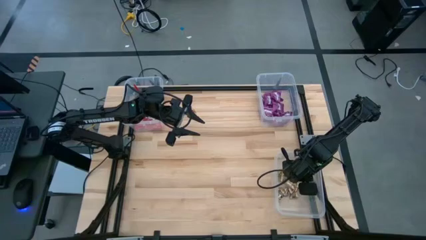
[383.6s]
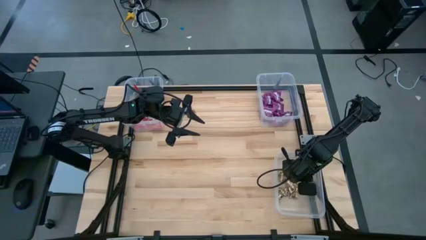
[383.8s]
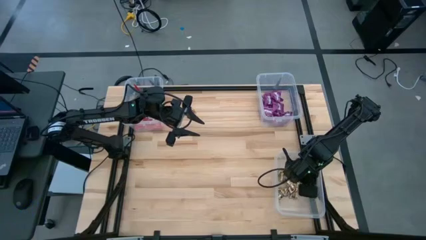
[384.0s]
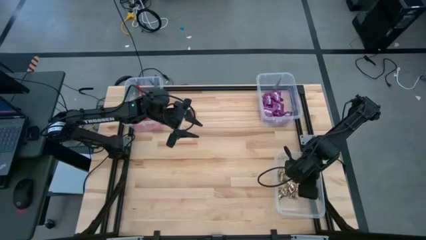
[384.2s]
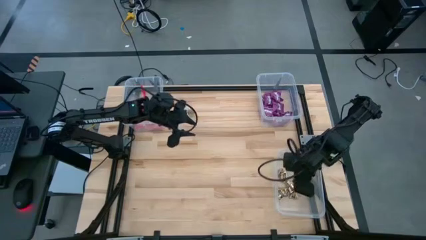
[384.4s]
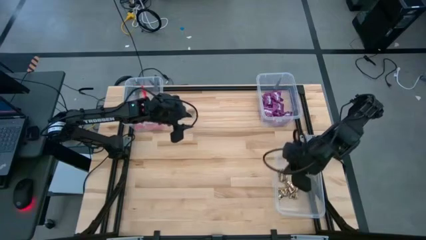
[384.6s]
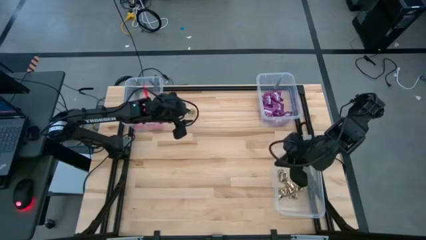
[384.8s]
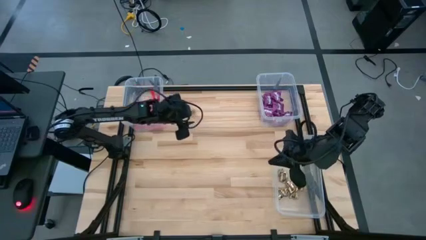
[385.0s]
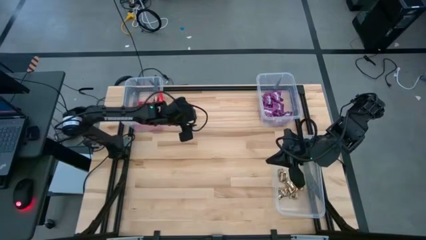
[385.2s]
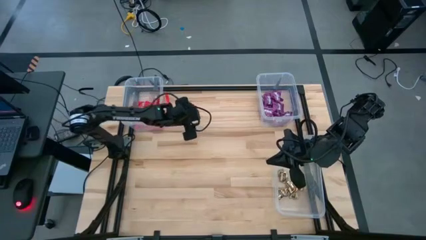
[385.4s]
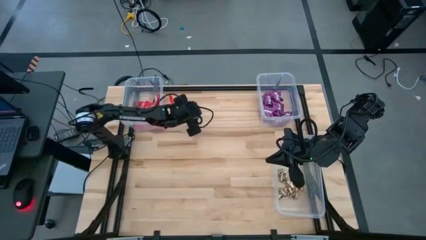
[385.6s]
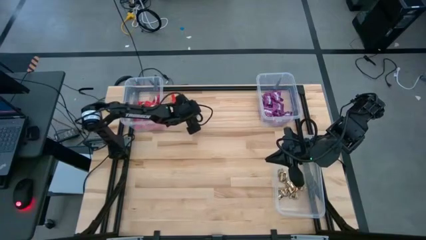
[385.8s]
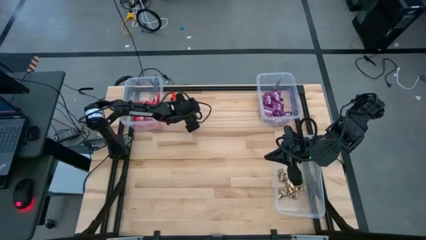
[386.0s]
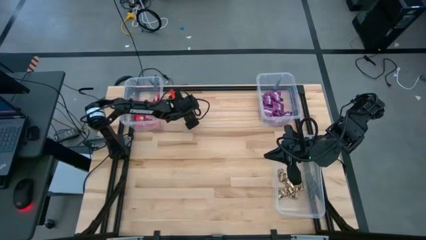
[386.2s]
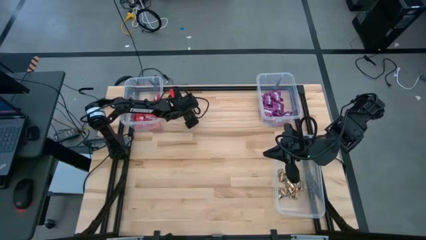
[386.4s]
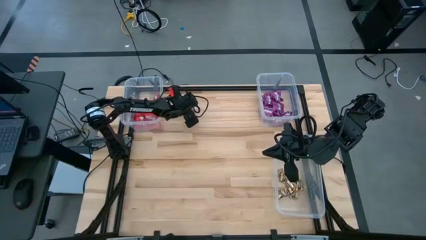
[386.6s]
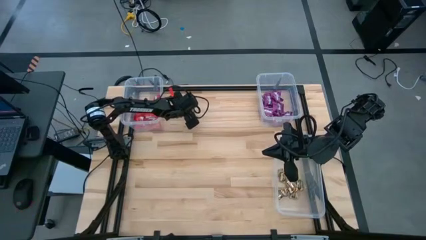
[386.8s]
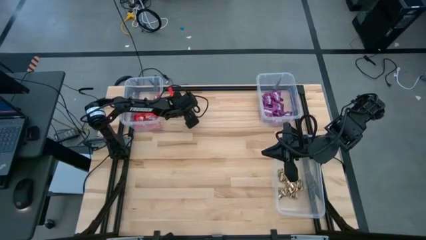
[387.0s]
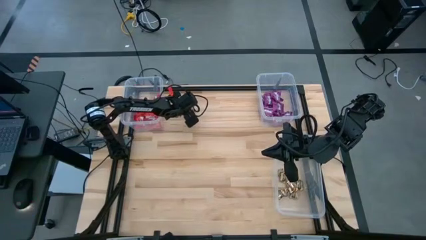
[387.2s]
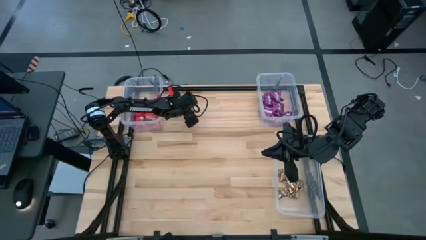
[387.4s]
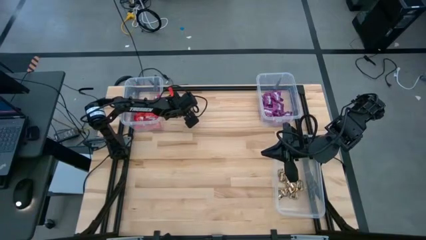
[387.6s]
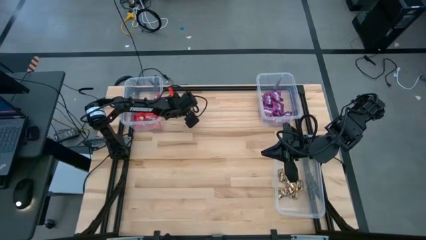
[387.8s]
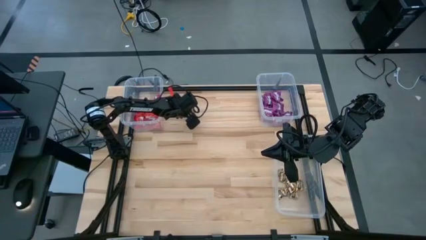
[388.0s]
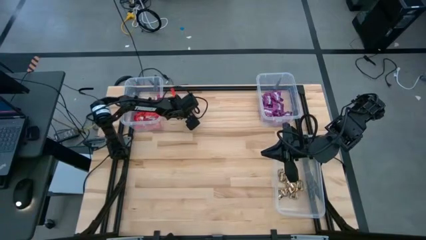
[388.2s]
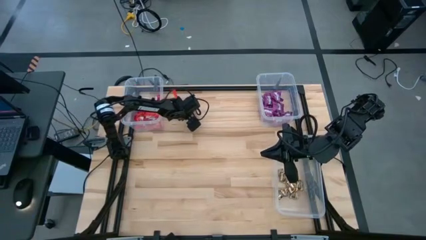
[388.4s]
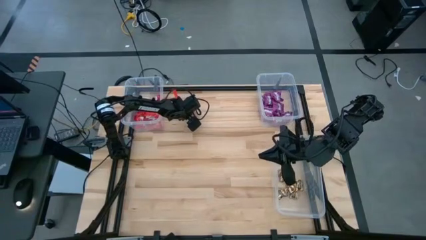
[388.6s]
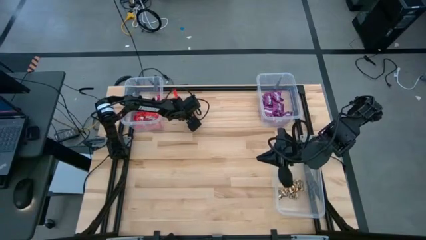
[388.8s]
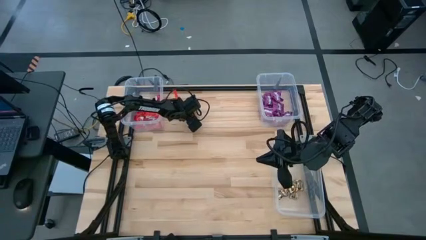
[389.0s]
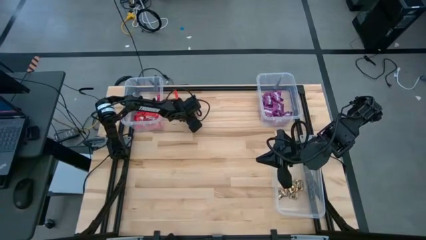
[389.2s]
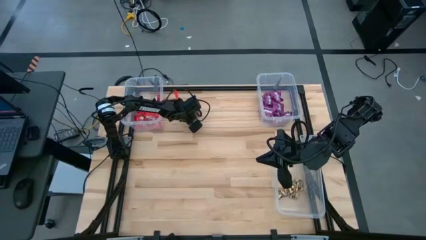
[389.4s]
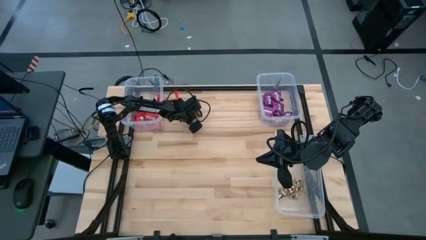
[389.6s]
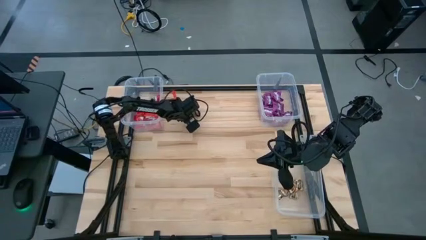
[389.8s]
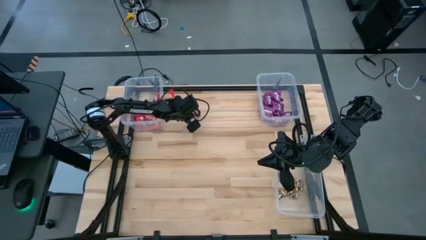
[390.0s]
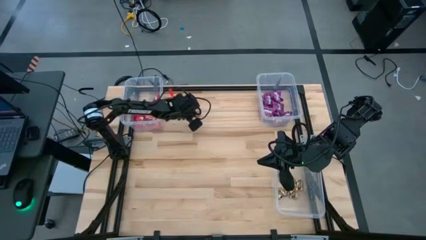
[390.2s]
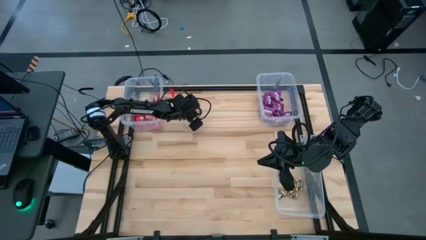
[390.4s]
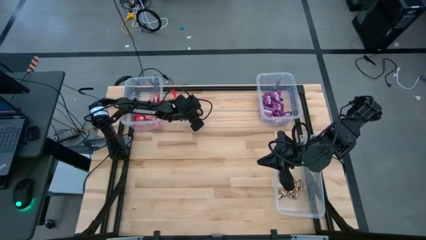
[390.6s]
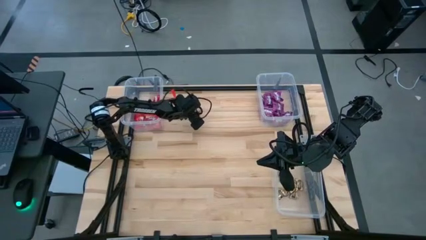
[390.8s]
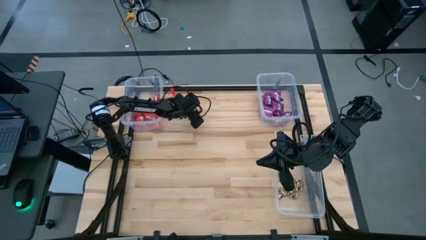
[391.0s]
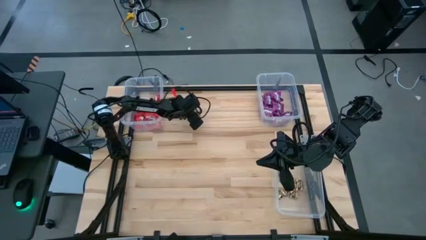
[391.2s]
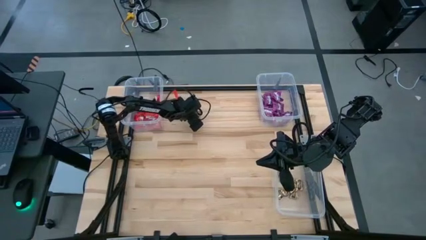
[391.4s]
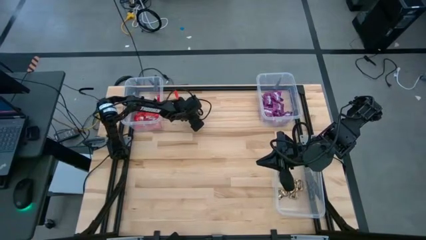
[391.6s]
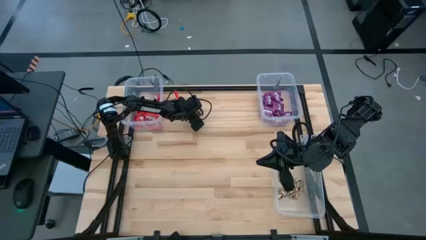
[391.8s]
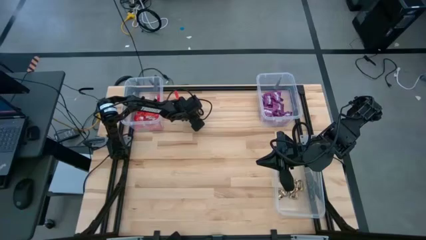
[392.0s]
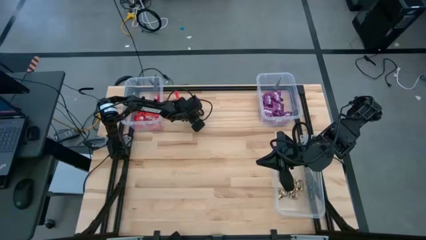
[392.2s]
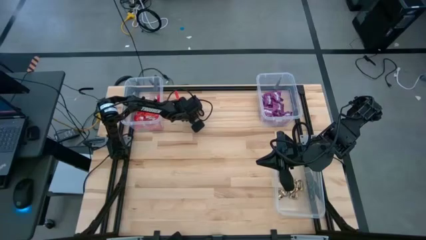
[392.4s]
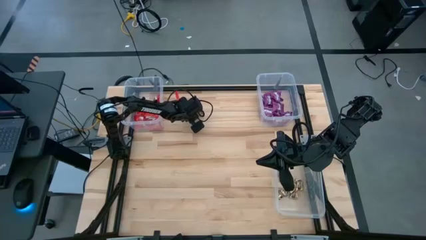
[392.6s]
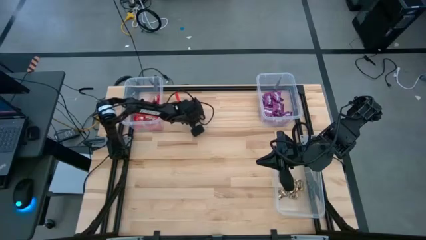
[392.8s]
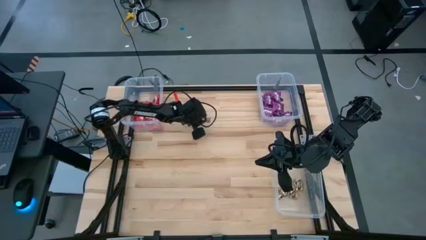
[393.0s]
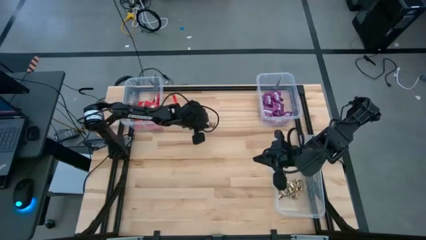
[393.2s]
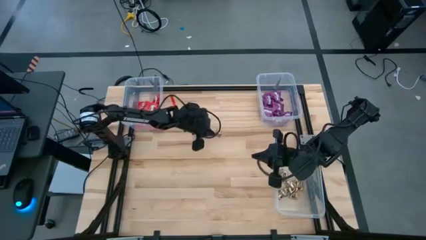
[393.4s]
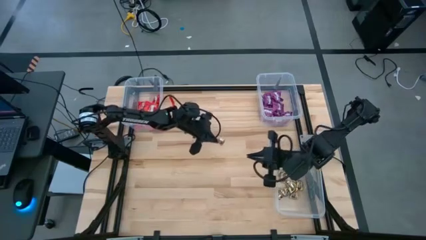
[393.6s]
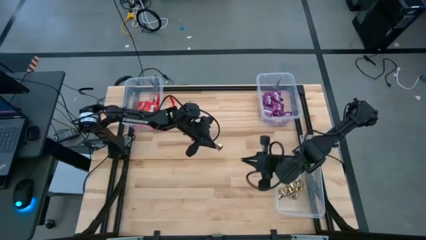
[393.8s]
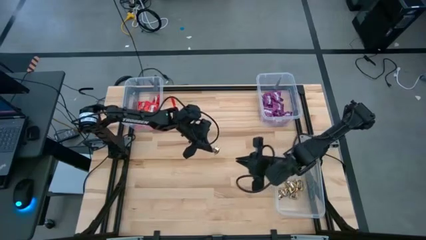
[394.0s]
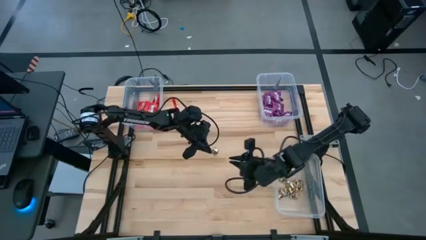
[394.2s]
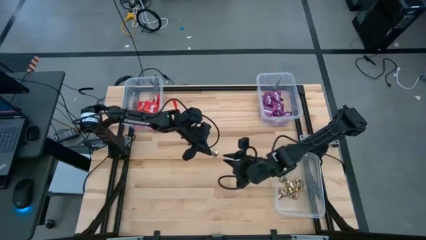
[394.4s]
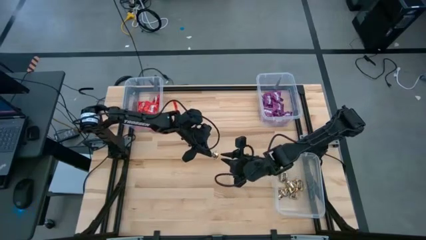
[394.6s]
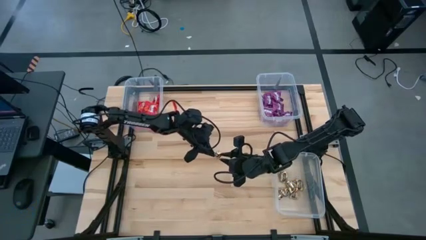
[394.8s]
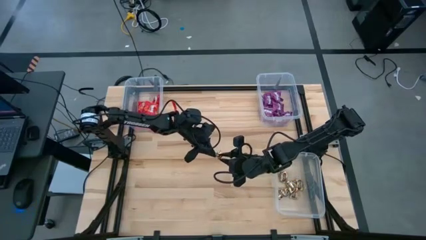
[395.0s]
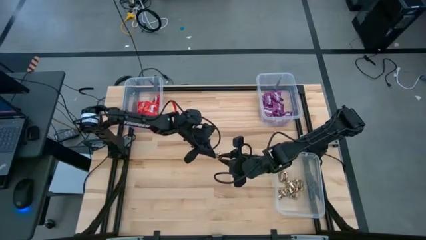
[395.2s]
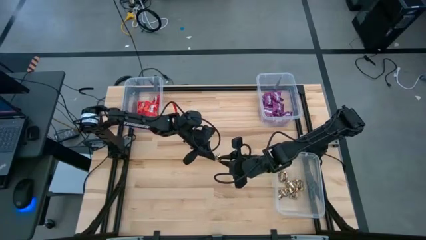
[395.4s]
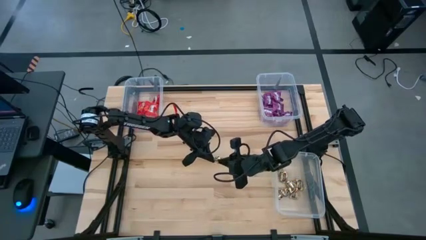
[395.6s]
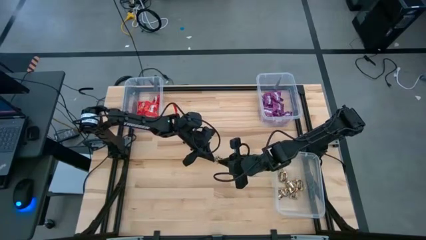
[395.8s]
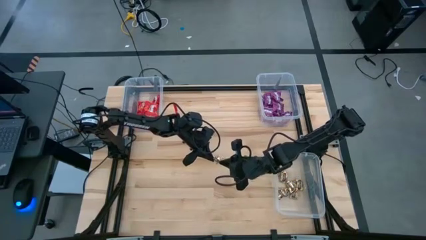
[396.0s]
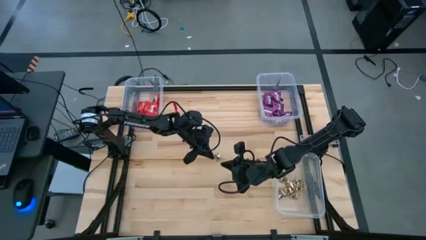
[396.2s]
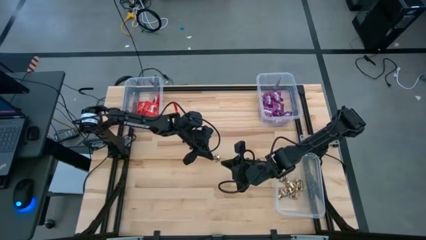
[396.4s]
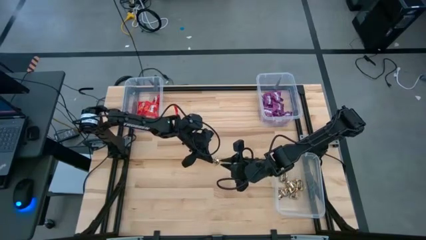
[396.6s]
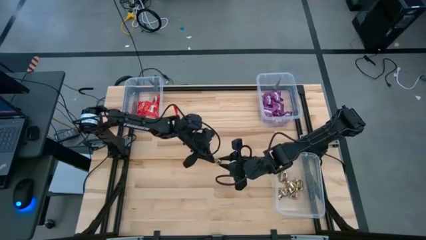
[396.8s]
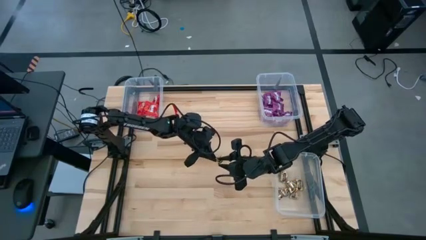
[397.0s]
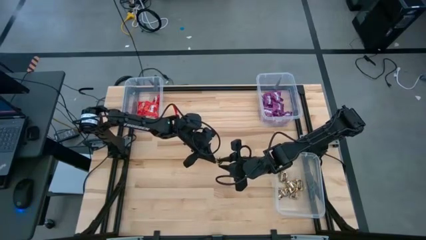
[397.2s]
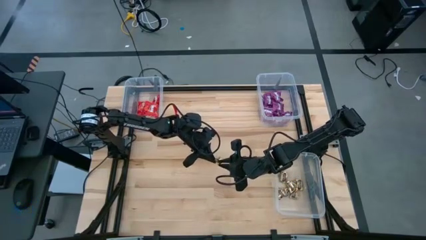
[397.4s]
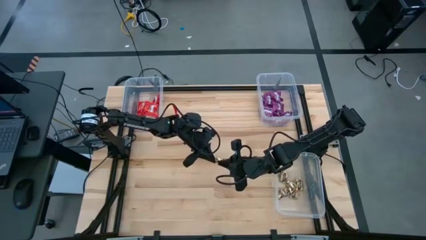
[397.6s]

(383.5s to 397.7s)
Task: Sort candy
Put the yellow candy into the bottom right transparent bin

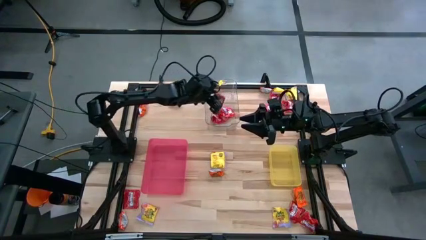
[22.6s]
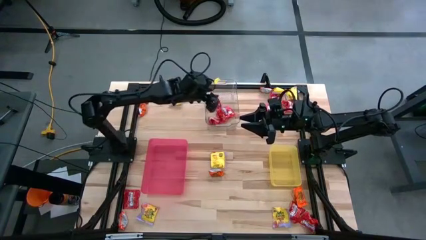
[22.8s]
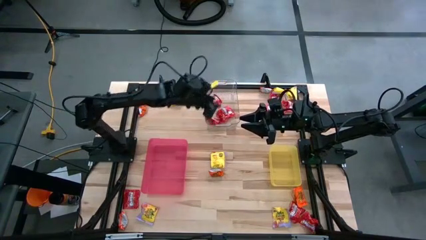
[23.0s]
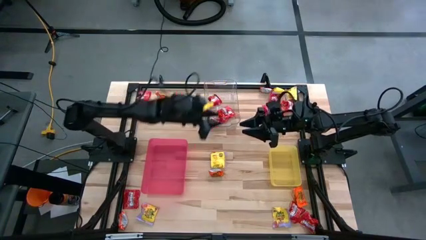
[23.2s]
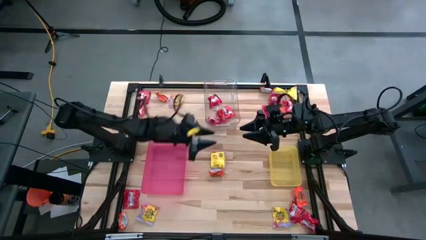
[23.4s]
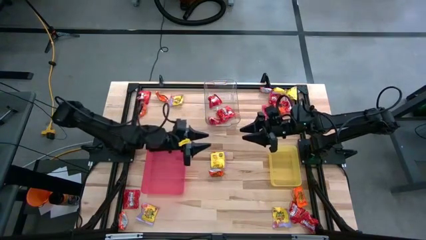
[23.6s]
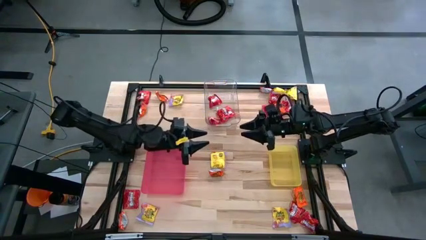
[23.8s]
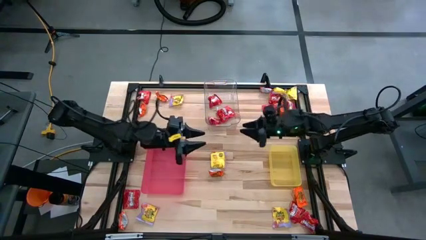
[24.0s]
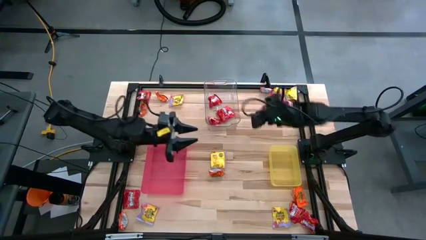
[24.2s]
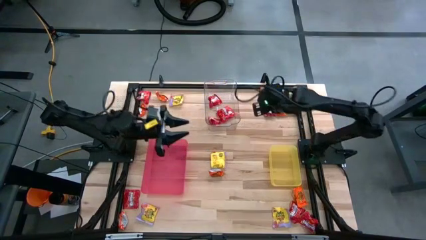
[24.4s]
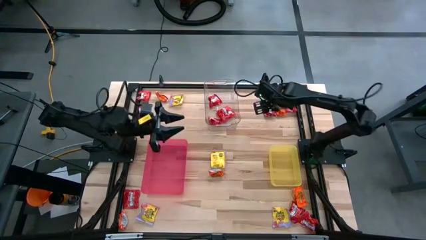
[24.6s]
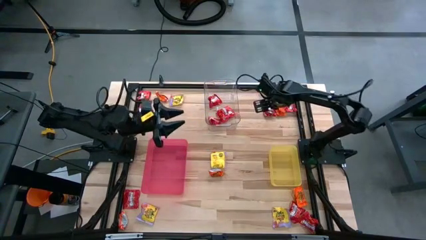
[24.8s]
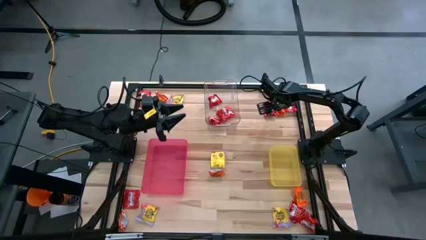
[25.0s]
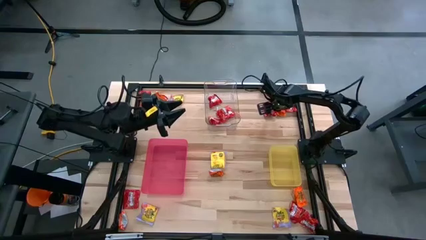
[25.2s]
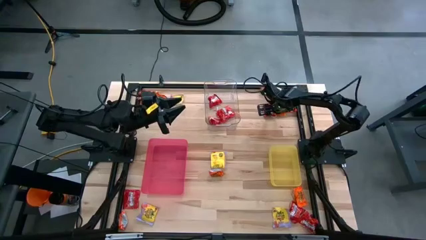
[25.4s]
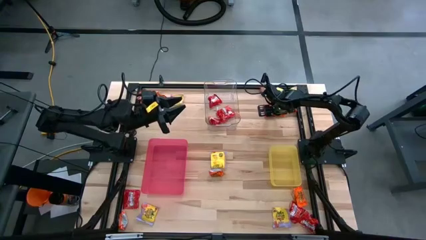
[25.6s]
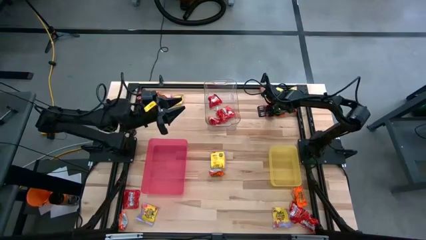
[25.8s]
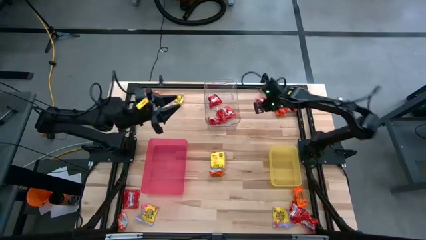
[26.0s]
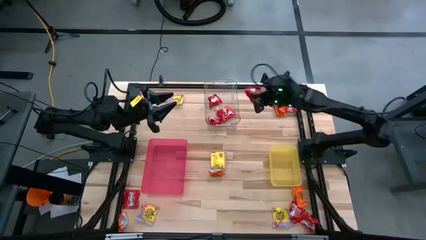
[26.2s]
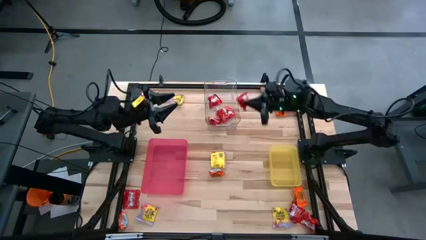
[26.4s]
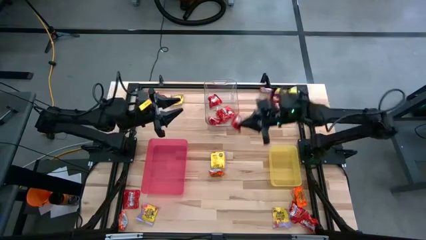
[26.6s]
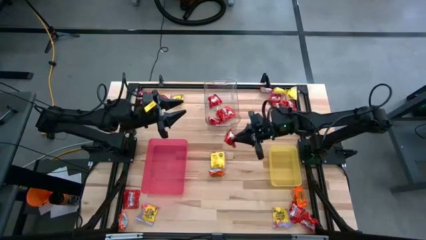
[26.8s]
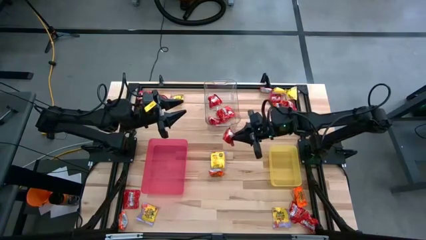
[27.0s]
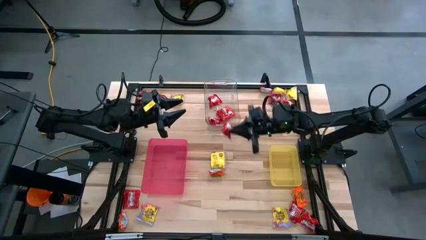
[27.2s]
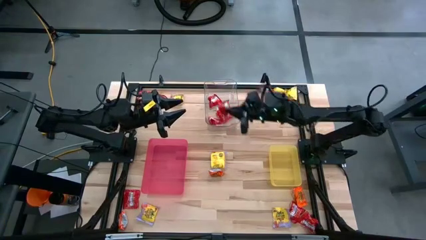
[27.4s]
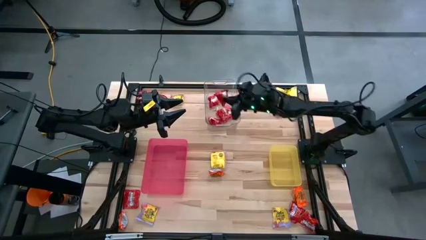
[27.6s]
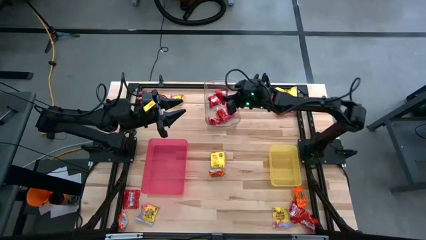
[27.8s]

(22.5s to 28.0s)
Task: Sort candy
Put the red candy into the transparent bin
